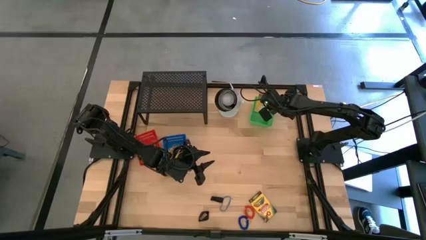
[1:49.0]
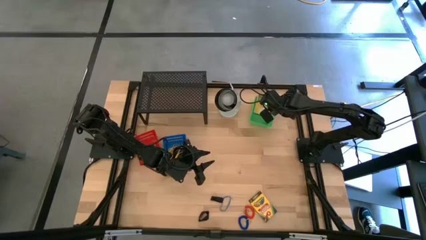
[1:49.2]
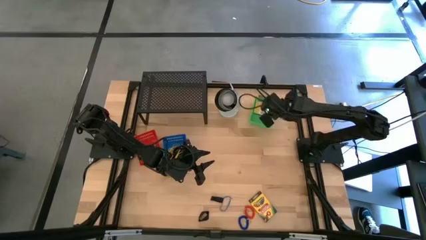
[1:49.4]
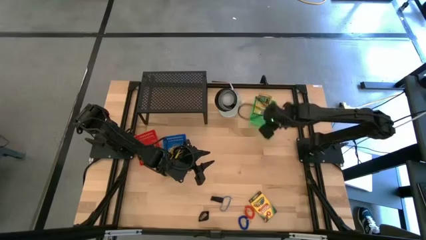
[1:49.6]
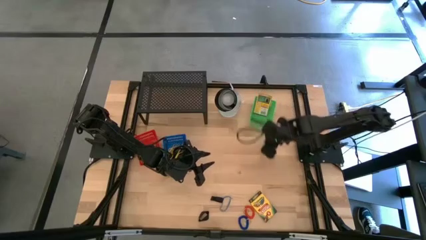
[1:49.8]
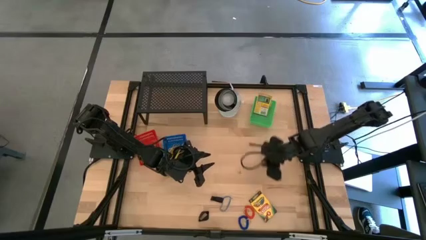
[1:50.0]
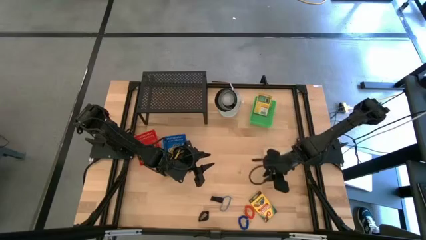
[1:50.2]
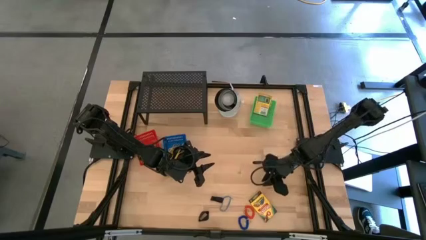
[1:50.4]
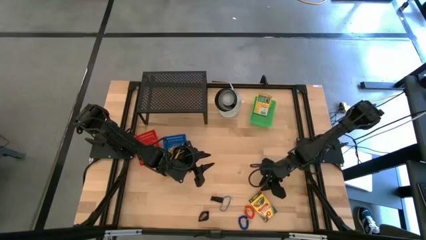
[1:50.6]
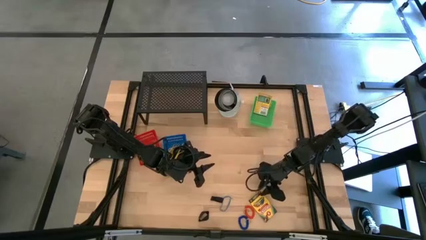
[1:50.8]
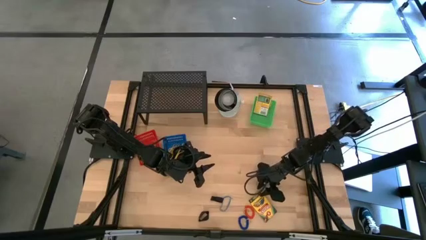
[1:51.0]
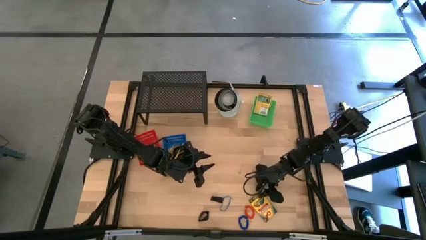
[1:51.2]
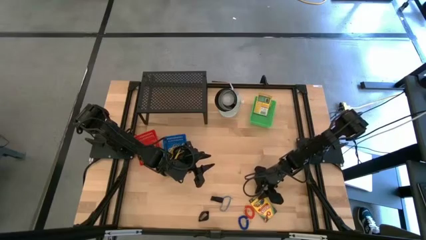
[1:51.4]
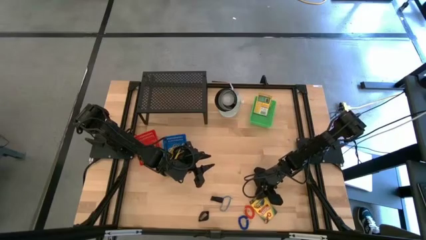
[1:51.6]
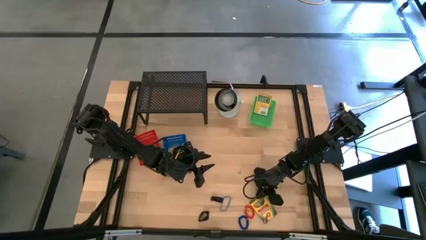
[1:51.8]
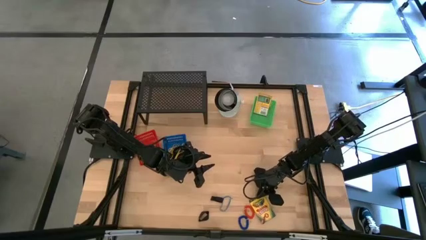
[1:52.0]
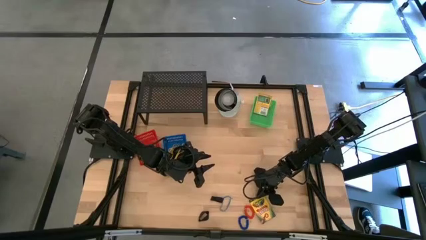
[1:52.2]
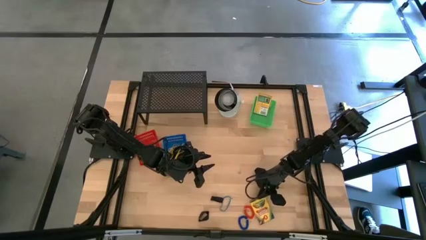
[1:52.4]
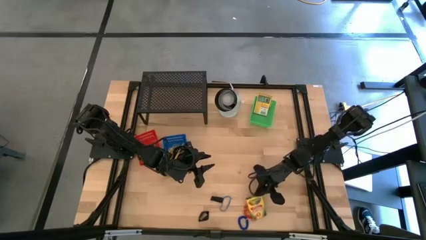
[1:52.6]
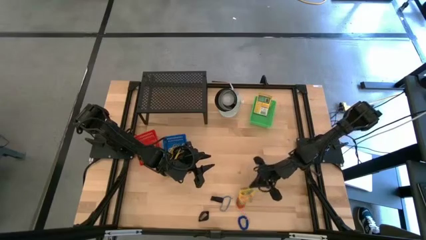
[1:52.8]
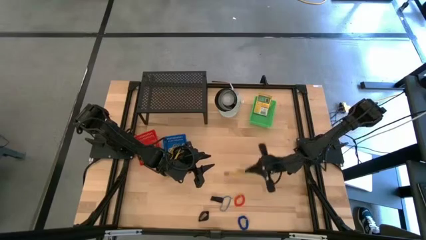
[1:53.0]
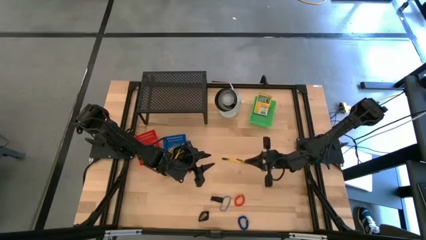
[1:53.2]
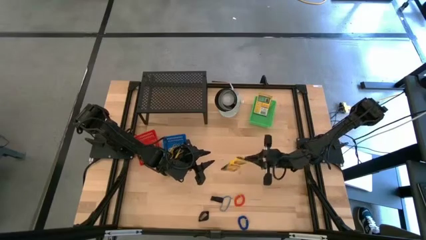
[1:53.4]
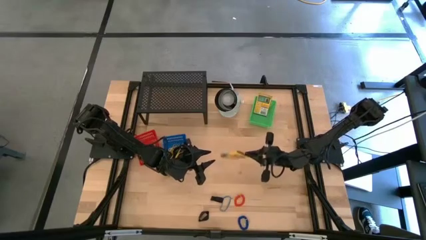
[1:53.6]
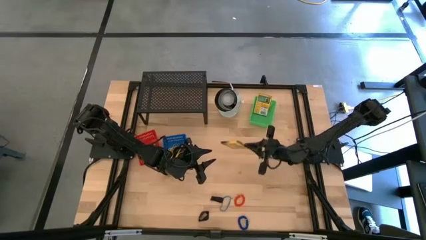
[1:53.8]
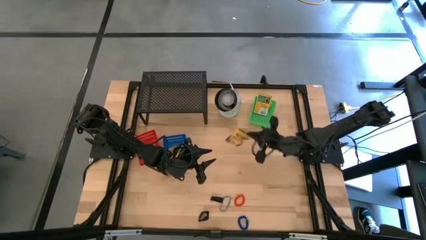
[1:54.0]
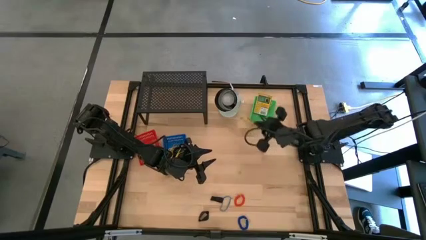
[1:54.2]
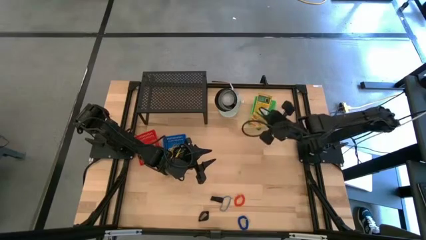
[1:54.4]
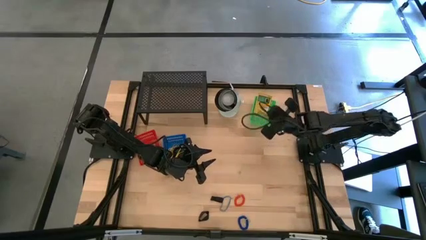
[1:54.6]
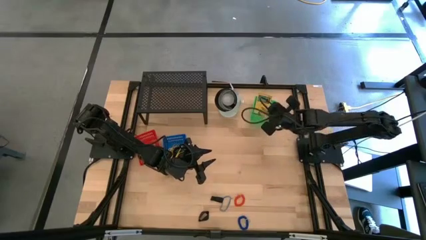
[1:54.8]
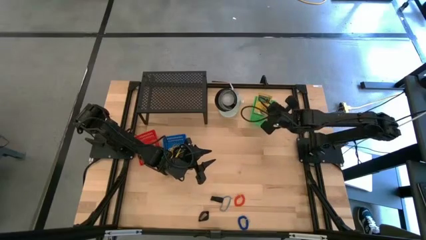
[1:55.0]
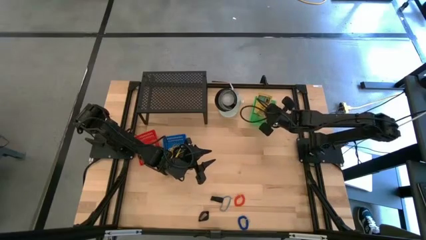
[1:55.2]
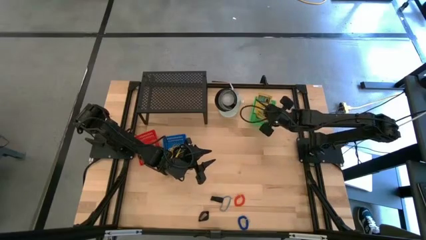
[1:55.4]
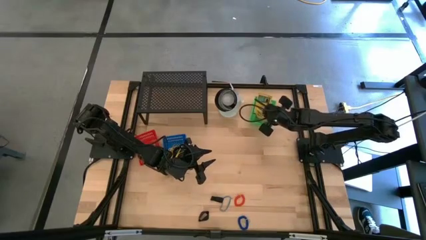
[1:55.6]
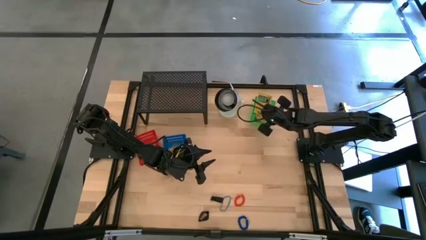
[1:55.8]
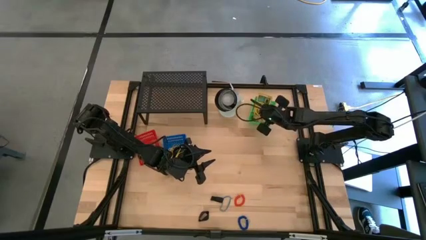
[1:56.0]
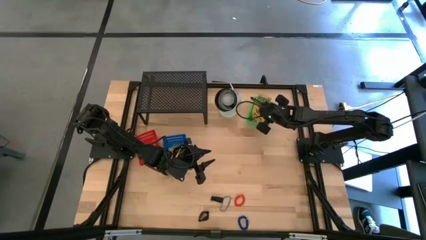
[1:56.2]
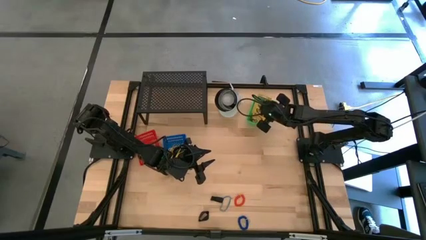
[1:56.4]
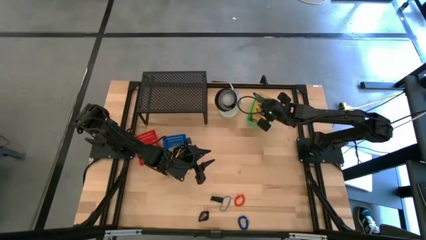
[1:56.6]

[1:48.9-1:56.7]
Task: Pick & Place Office Desk Supplies
Put the yellow crayon box into the green bin

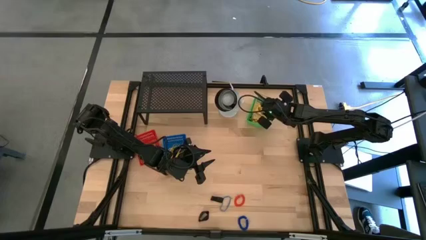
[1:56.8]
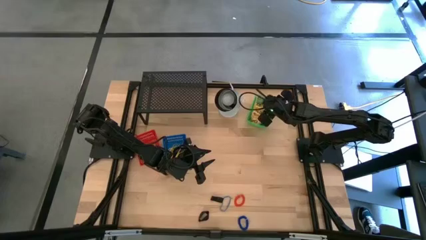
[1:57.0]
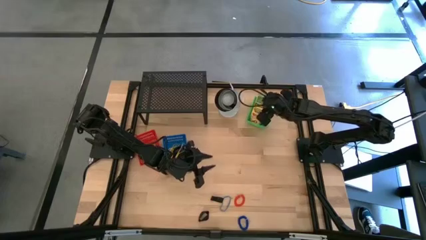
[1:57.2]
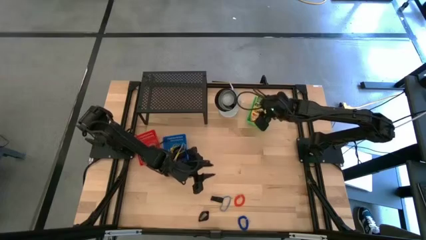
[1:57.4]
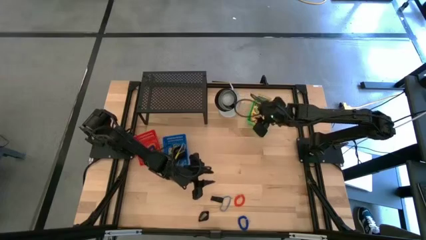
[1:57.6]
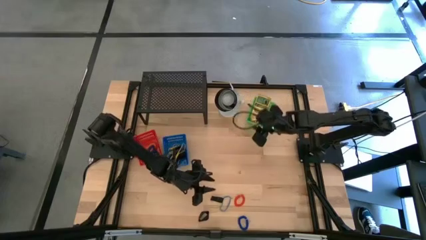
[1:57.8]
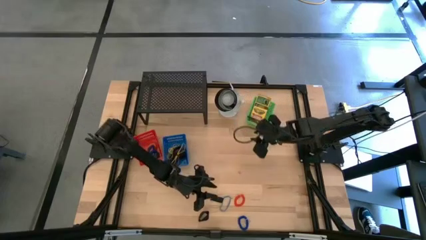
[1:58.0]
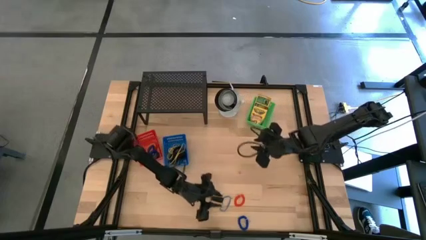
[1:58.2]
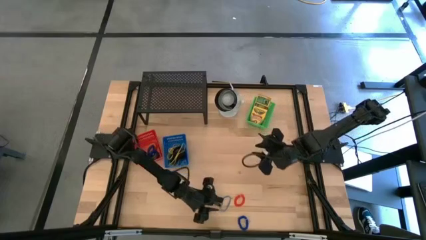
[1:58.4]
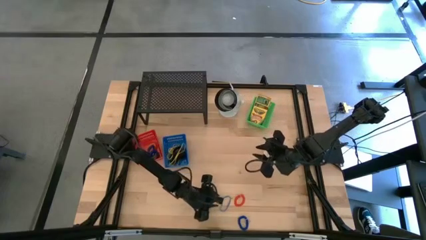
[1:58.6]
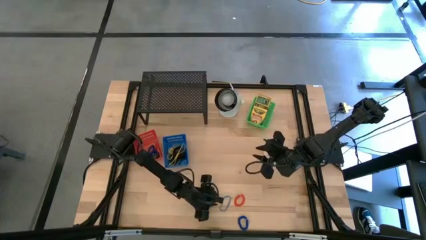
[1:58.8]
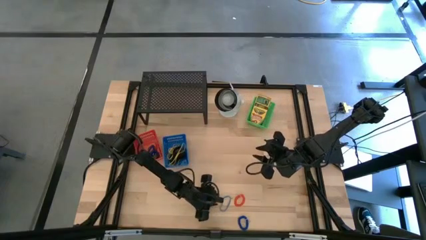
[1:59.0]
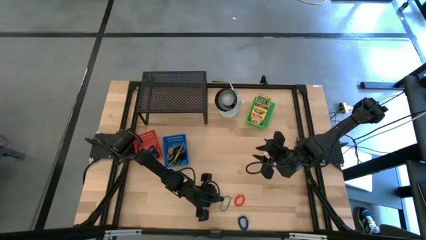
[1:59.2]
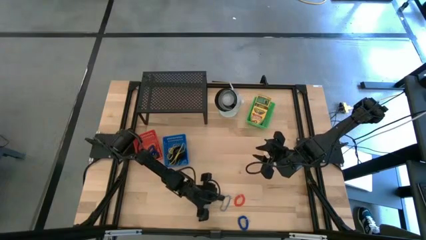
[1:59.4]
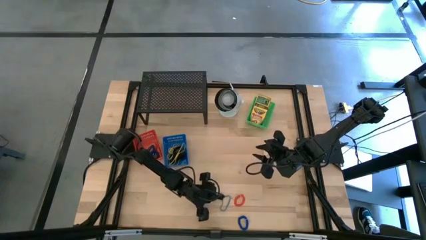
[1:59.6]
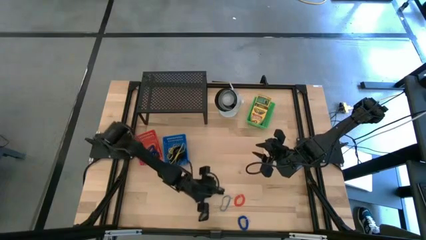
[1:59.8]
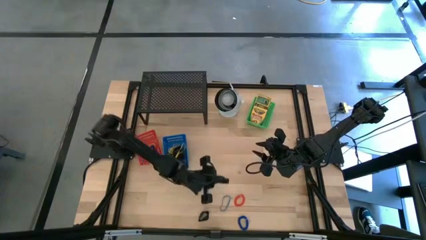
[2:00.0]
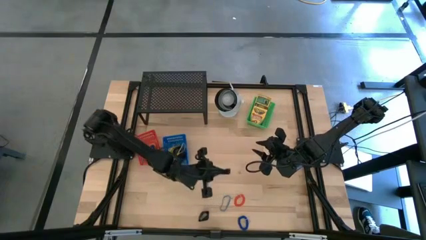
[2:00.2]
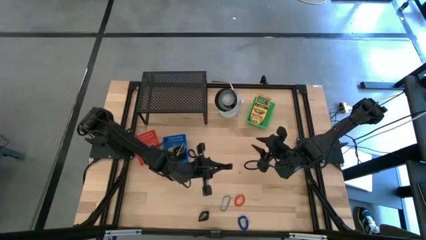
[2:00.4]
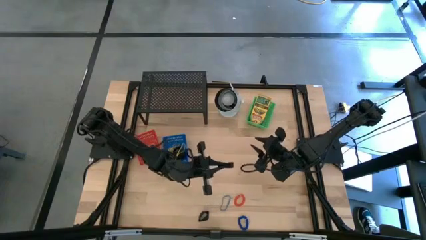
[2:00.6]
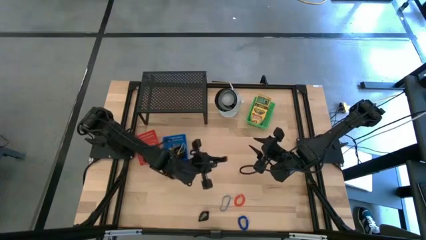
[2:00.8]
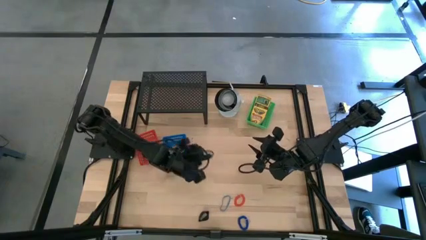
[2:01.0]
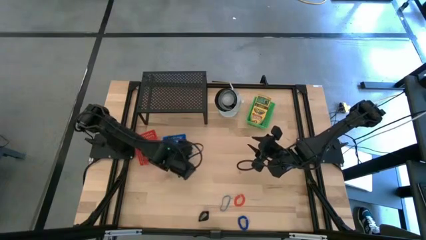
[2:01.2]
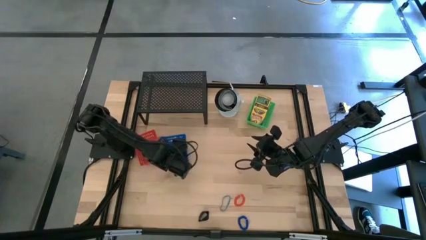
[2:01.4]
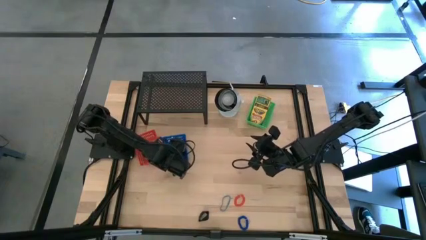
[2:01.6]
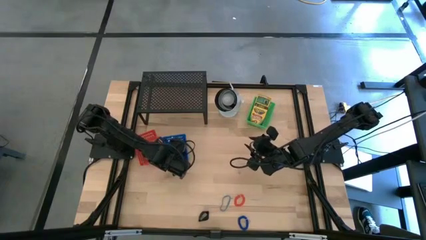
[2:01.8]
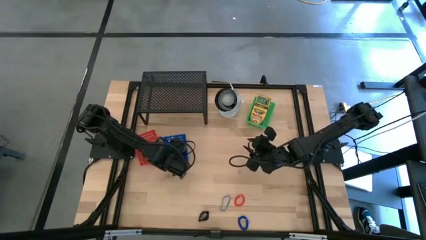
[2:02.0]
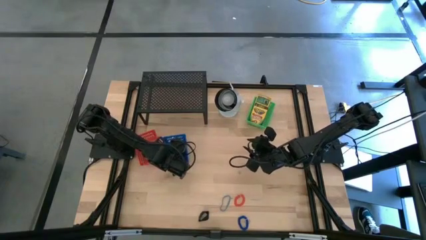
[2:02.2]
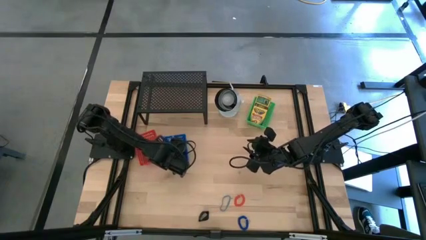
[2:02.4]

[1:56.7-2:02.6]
Put the black rubber band into the blue bin

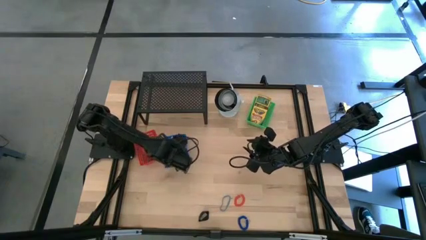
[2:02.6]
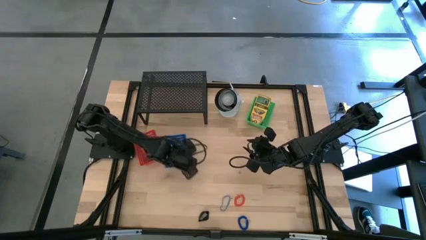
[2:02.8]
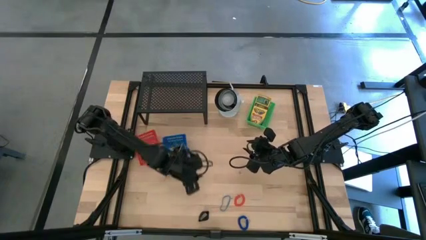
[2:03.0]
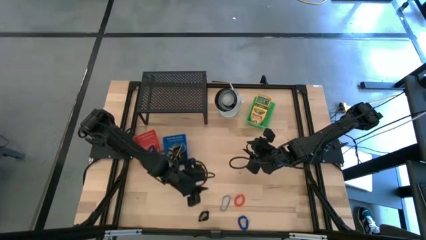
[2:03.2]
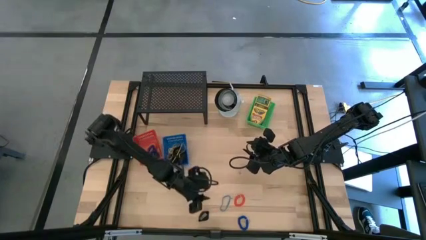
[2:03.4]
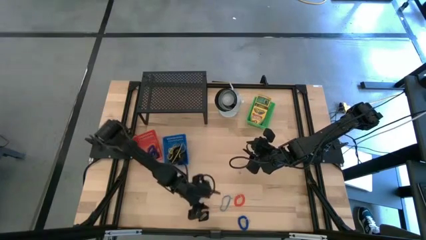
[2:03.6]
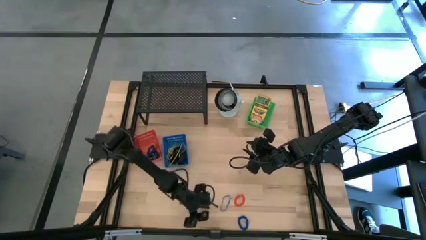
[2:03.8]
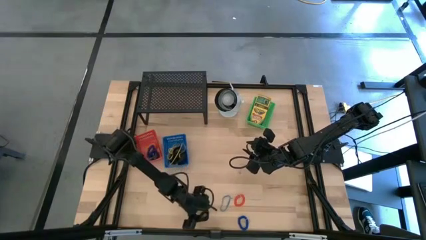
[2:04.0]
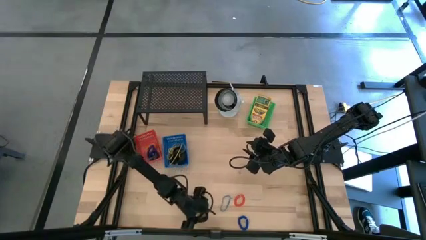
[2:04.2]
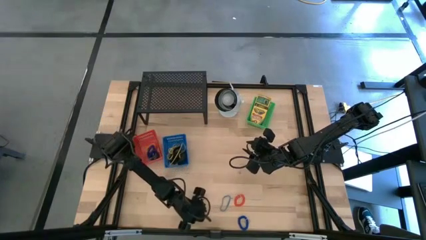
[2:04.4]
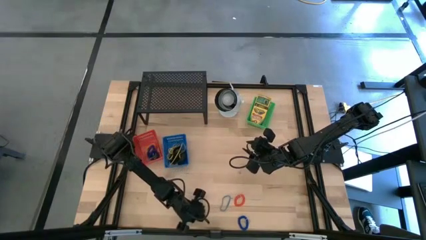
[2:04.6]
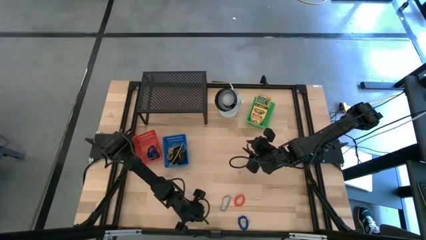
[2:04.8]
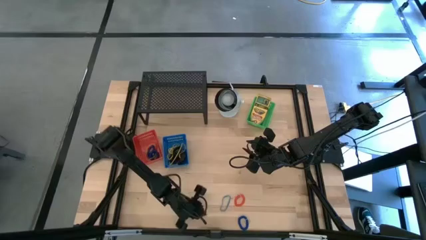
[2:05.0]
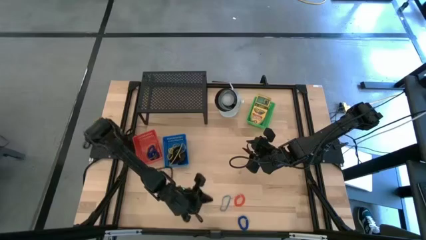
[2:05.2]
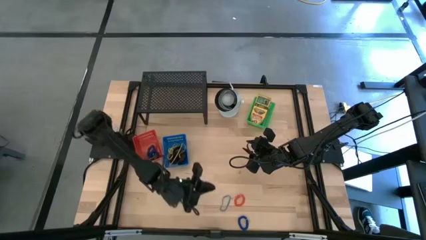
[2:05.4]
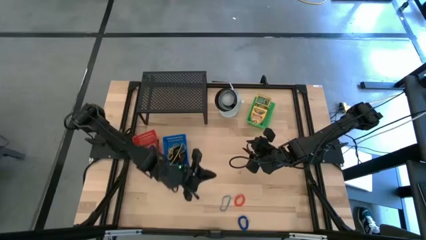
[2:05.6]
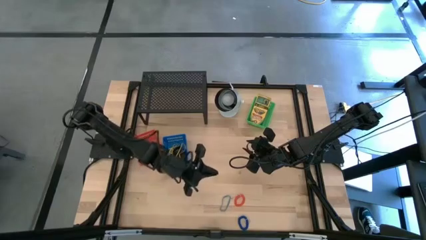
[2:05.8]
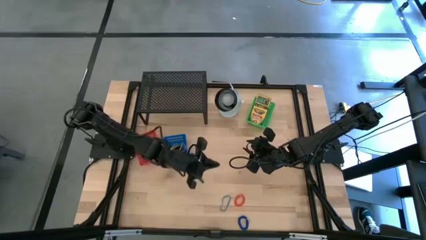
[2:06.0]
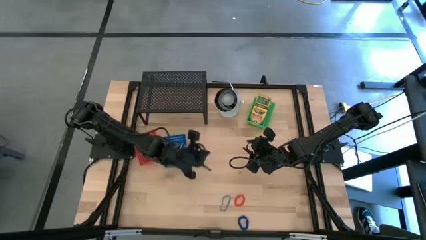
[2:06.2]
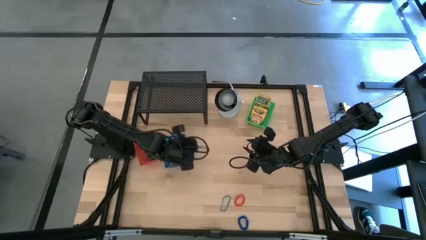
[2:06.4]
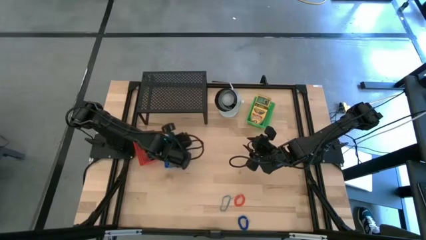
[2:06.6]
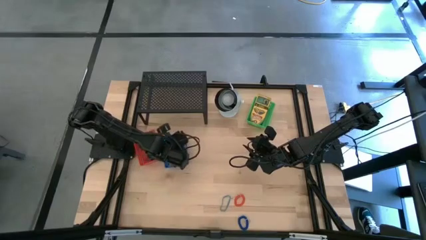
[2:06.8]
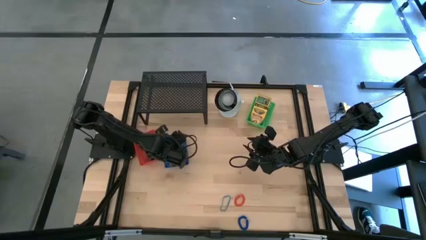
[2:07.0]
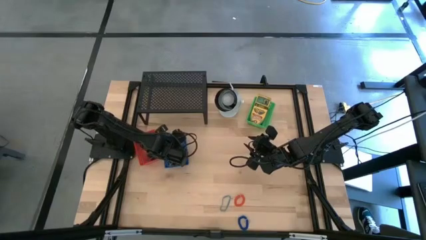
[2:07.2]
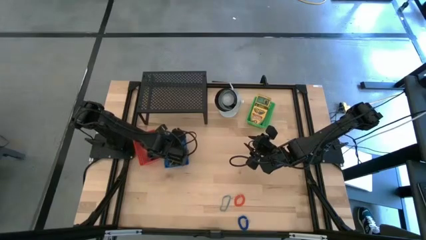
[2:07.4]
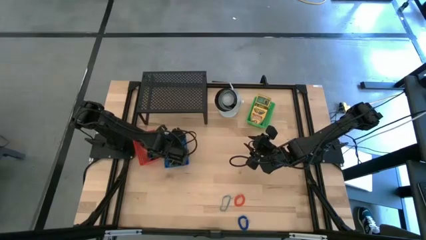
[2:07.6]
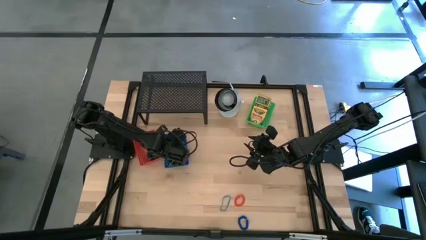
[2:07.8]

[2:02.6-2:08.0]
Put the black rubber band into the blue bin
